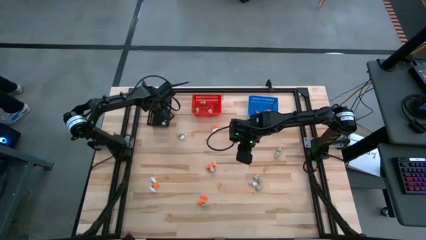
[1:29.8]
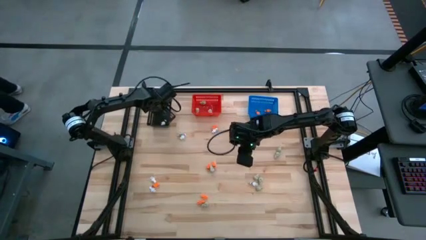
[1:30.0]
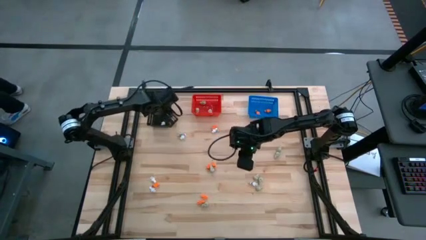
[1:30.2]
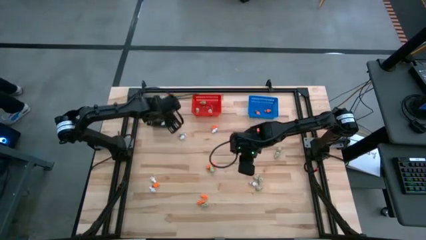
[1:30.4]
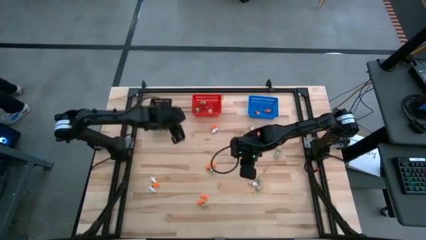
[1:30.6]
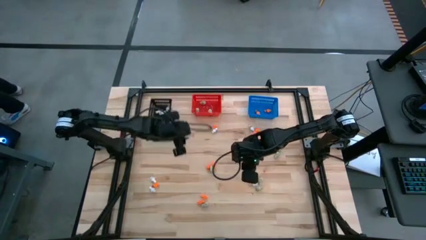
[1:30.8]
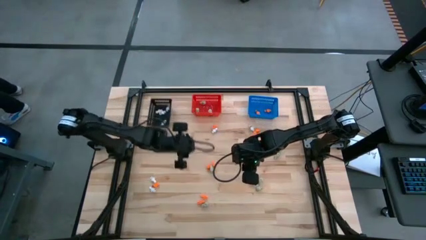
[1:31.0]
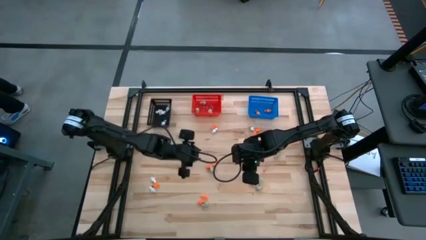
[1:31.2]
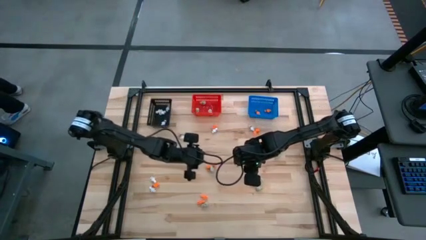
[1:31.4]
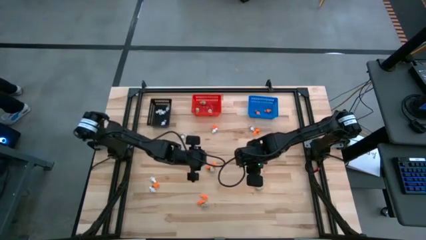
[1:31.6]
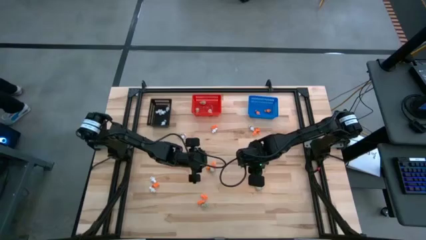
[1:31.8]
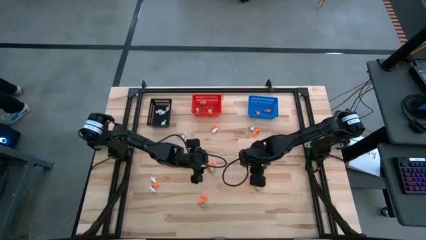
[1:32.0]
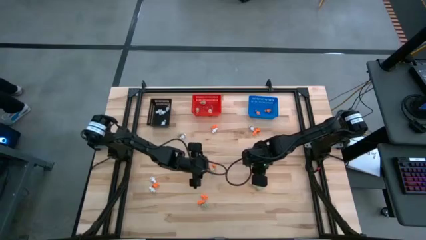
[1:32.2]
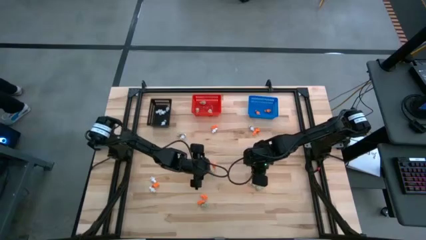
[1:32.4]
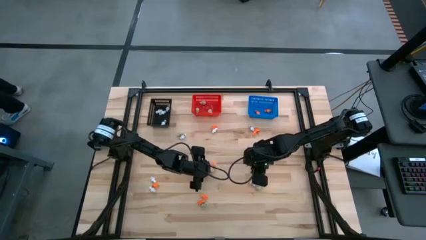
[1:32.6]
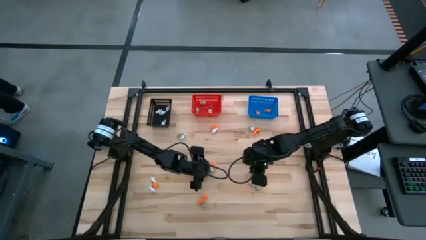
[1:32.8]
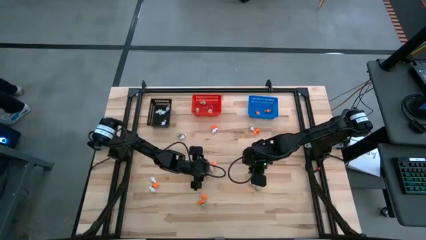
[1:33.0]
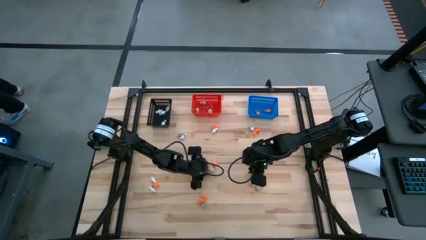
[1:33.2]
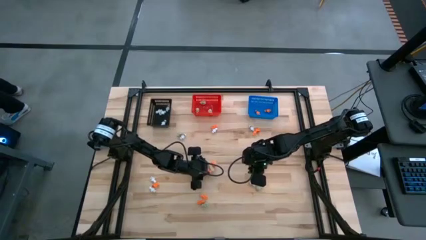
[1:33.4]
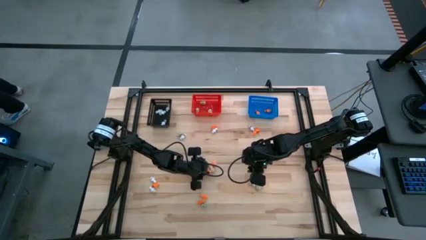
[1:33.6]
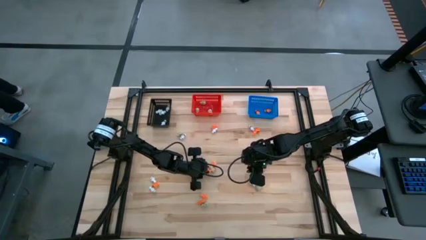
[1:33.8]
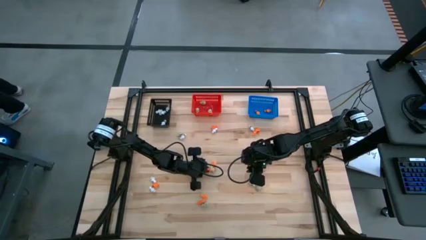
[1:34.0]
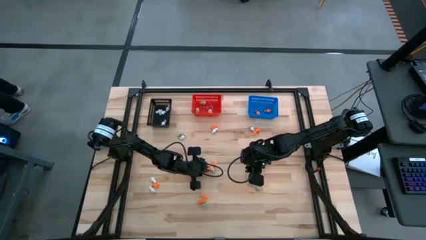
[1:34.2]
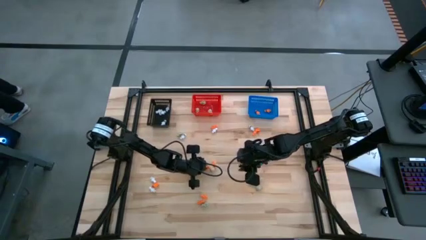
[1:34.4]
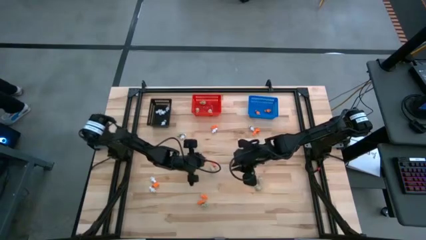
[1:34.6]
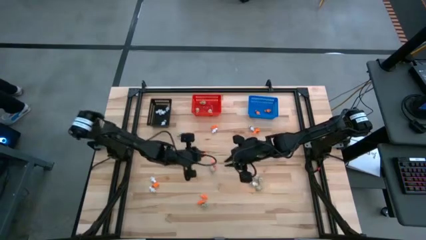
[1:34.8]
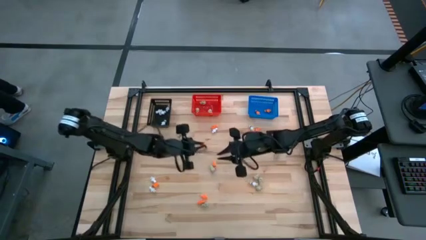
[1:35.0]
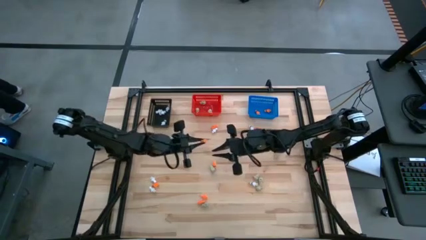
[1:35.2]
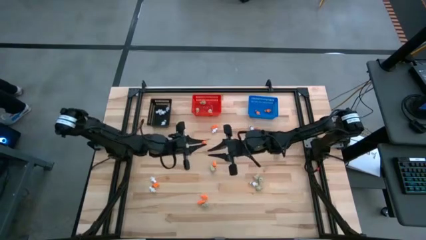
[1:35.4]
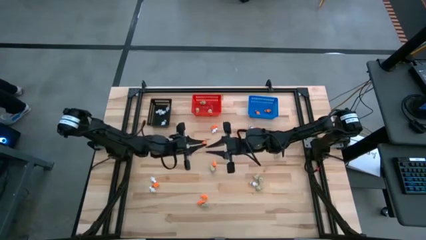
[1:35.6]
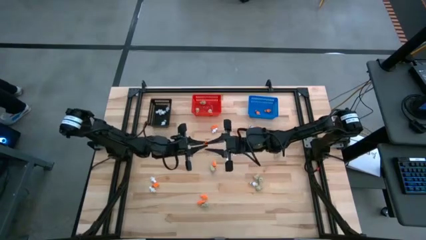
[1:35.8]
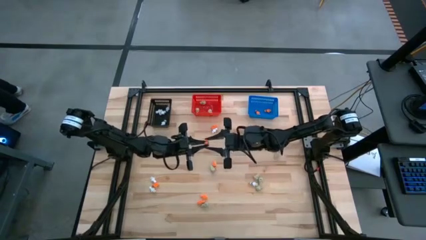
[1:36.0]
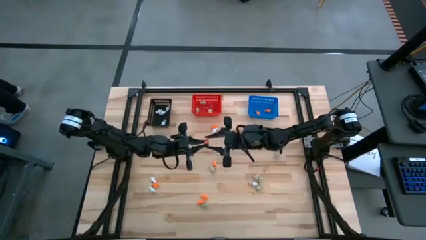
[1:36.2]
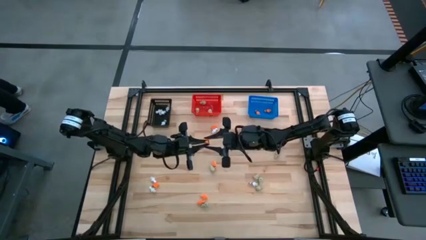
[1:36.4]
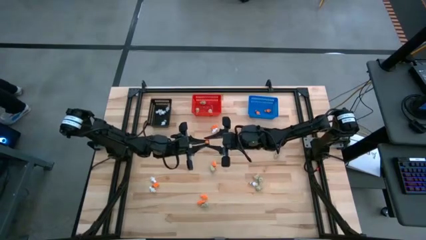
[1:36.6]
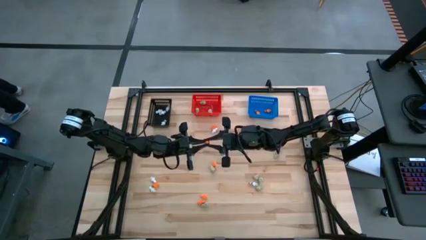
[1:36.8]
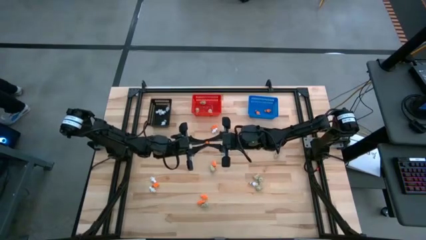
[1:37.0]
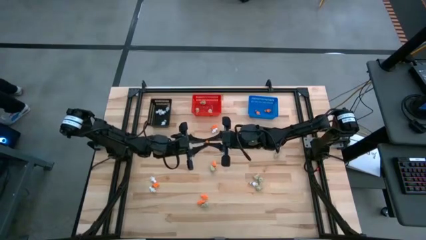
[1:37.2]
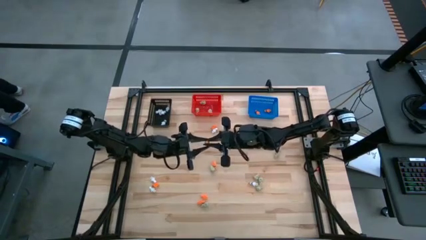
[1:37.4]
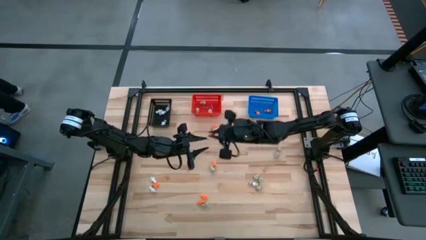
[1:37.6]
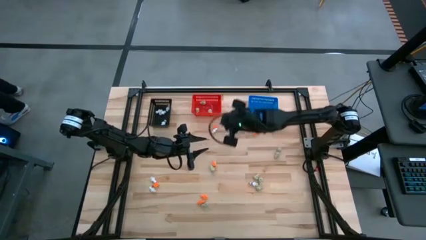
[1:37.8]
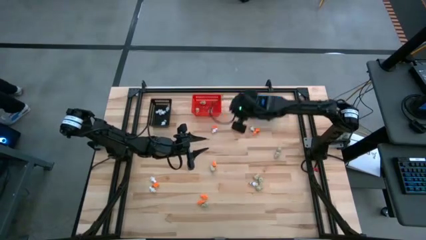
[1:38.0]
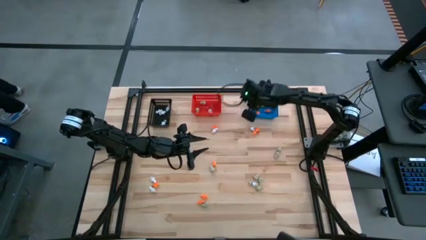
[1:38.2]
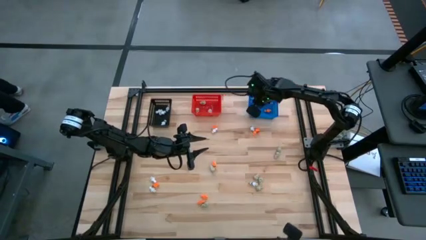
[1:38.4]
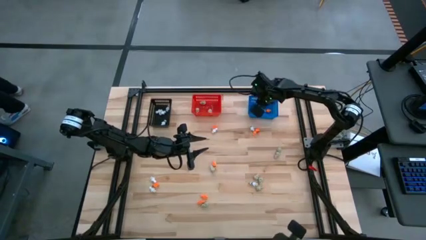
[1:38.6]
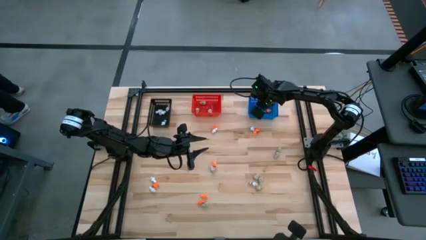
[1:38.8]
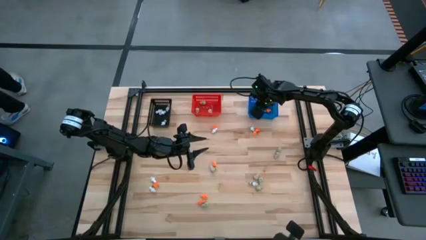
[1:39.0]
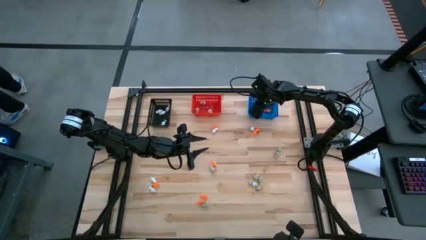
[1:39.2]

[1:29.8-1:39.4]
Task: Sort Halloween decoration
Put the orange skeleton toy into the blue bin

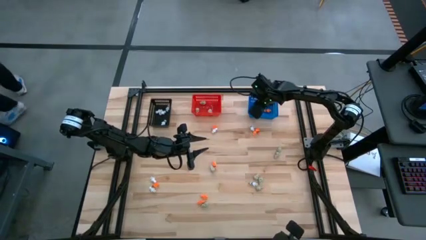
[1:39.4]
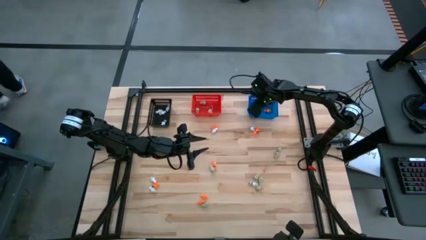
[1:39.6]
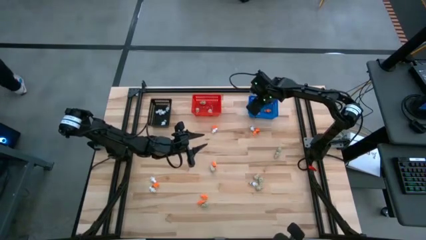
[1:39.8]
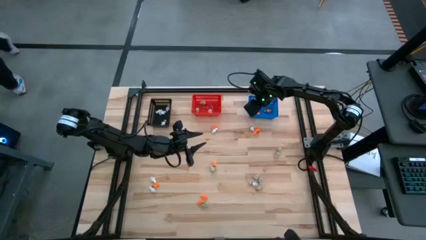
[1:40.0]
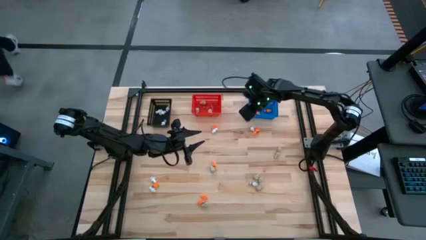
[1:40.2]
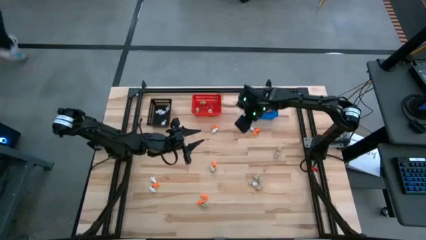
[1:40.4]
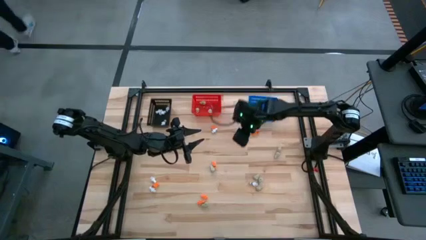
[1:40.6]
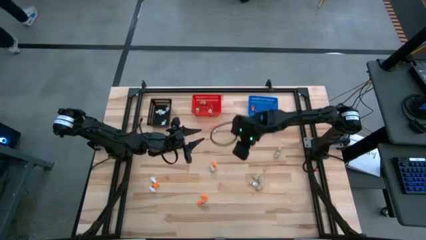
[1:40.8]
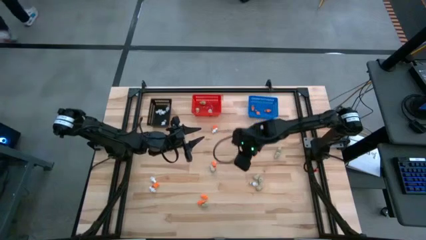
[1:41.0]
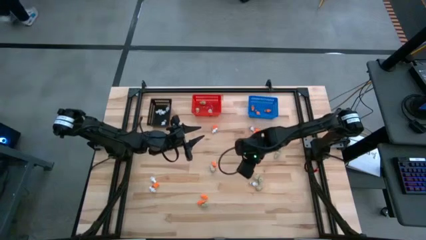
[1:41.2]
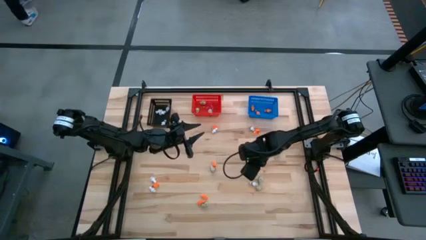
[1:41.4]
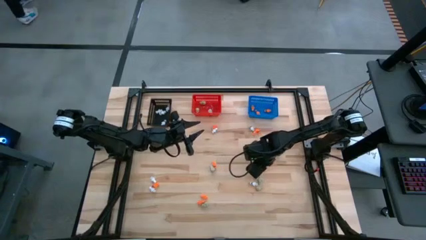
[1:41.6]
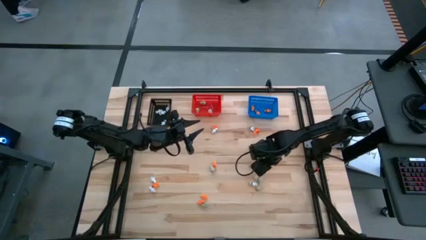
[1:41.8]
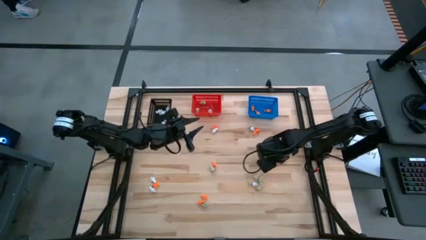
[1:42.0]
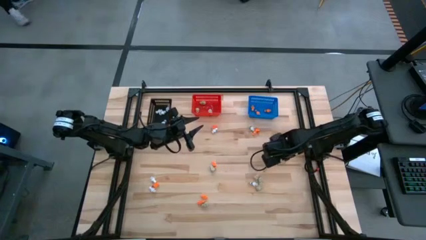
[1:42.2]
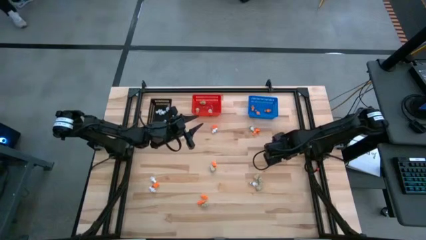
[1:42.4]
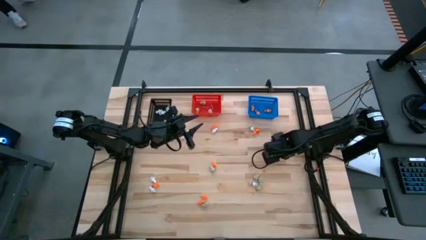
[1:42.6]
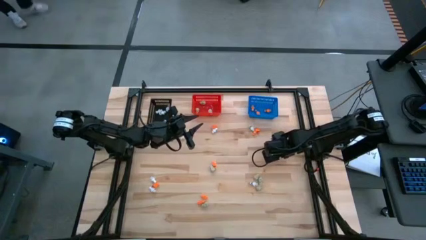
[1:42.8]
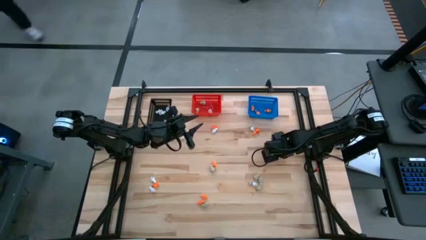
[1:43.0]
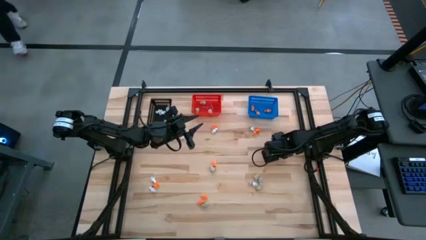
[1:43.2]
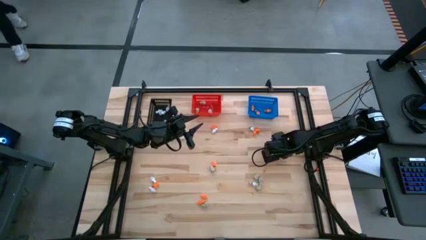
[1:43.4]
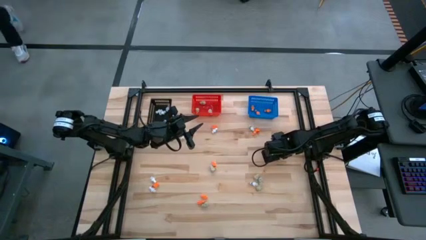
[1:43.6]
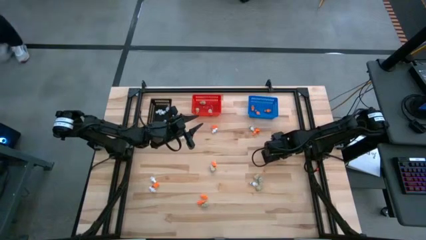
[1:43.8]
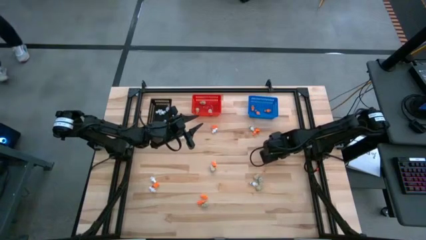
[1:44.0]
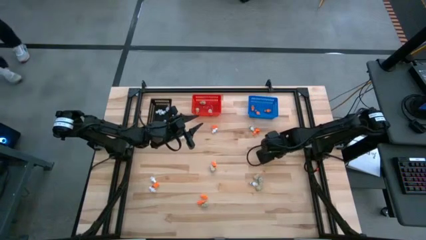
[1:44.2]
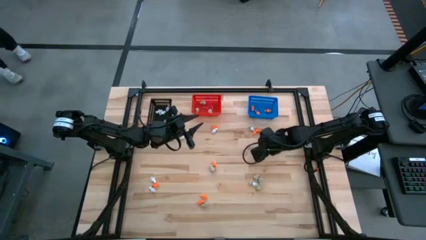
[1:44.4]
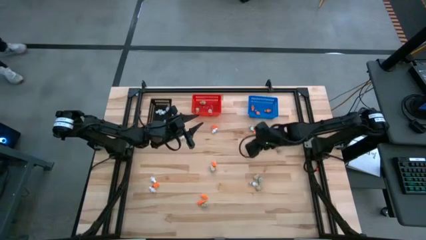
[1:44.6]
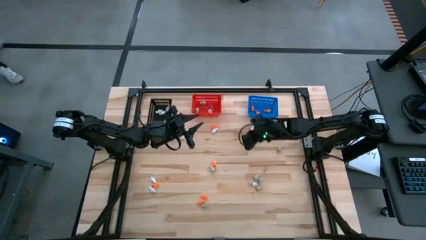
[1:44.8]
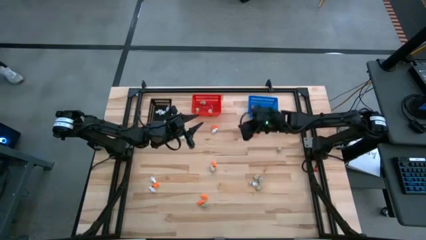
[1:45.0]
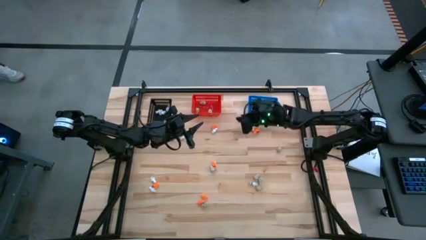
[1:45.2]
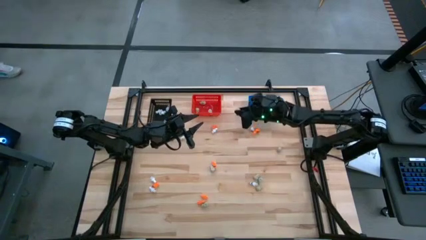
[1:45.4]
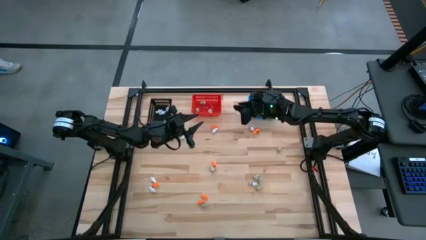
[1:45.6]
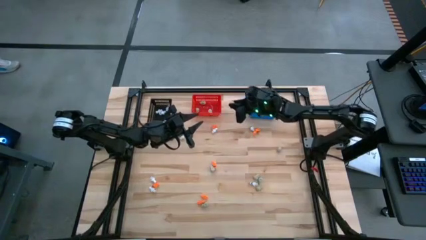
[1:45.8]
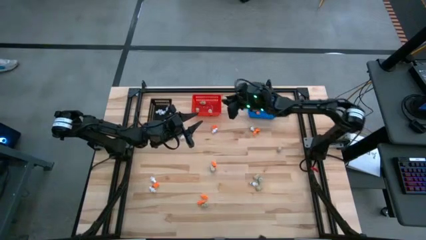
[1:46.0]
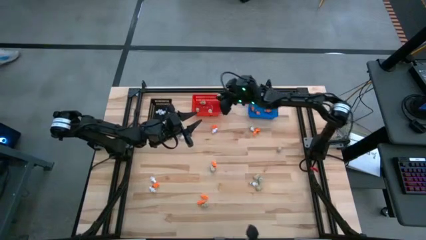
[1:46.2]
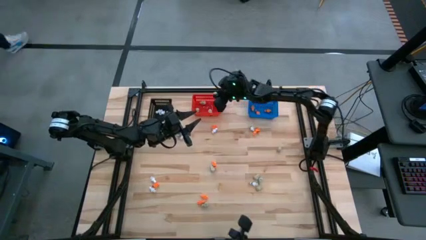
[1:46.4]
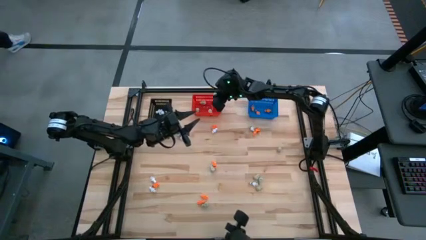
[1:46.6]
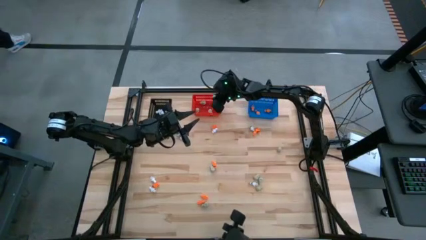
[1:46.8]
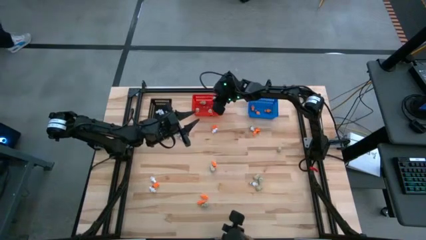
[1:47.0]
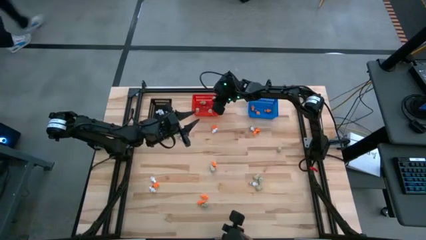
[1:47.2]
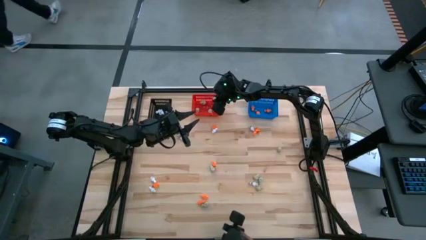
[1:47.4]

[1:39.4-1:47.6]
Put the white skull toy into the red bin
